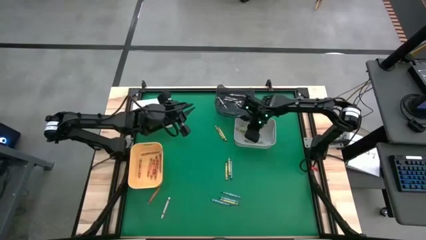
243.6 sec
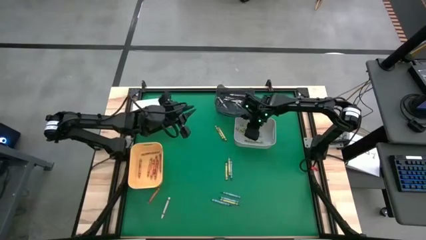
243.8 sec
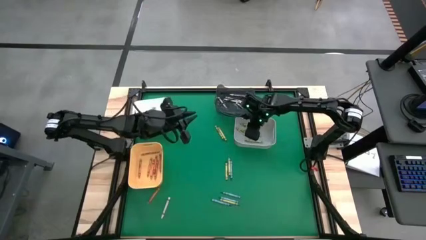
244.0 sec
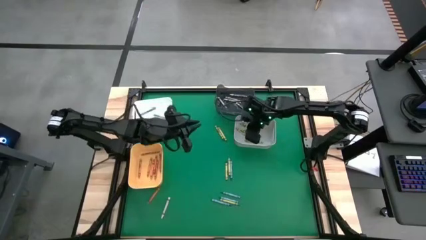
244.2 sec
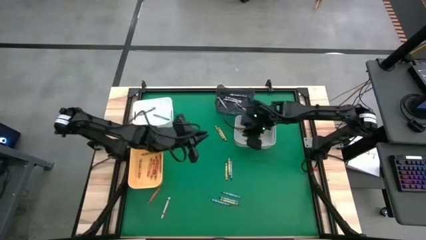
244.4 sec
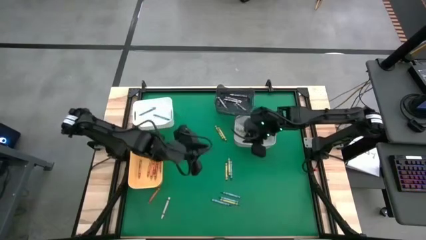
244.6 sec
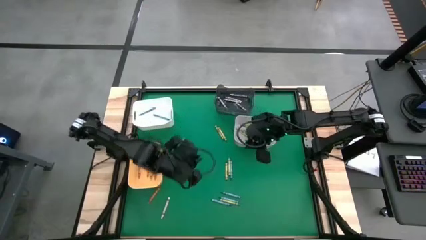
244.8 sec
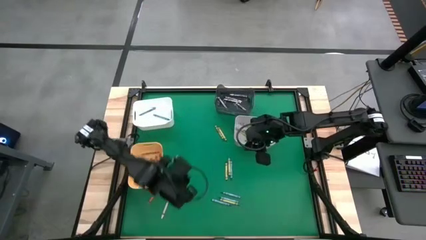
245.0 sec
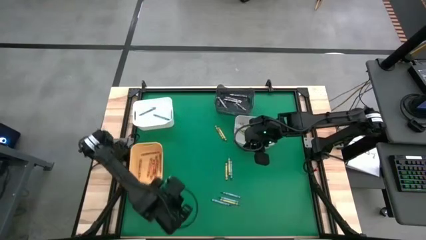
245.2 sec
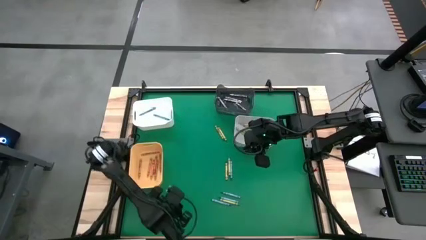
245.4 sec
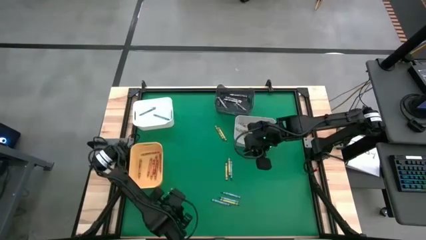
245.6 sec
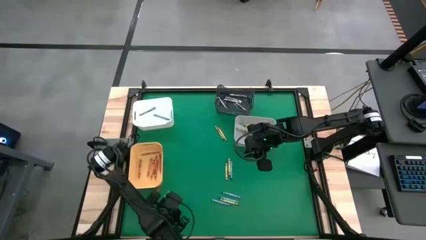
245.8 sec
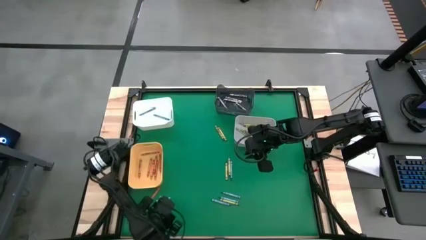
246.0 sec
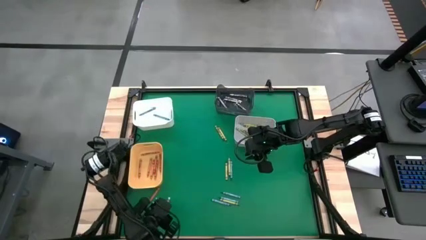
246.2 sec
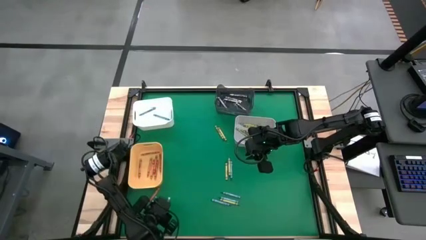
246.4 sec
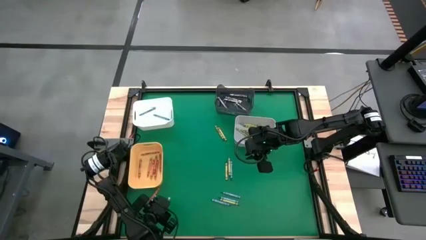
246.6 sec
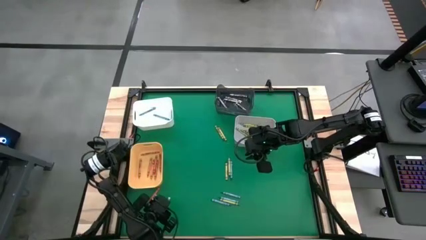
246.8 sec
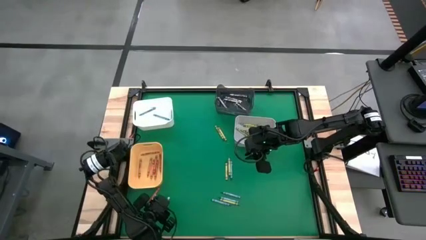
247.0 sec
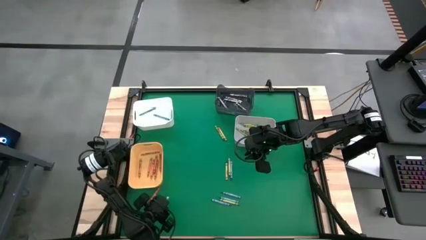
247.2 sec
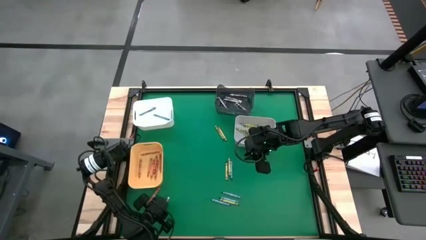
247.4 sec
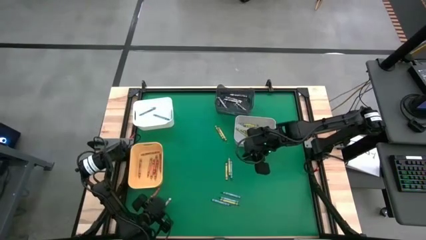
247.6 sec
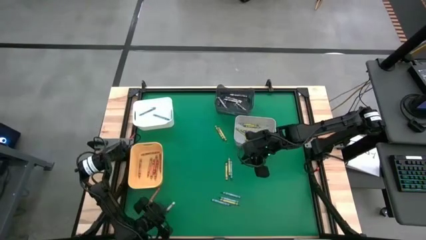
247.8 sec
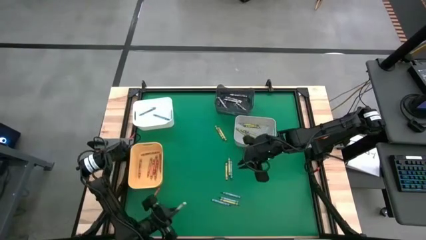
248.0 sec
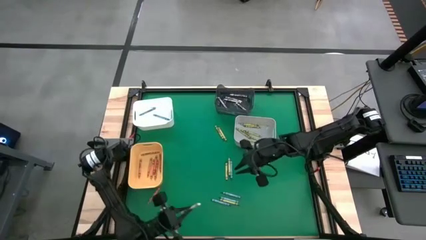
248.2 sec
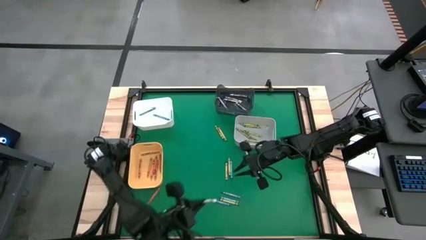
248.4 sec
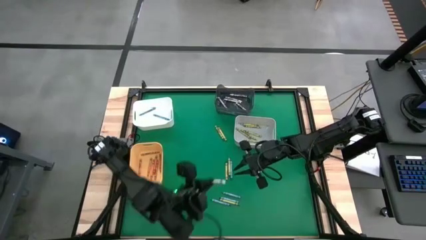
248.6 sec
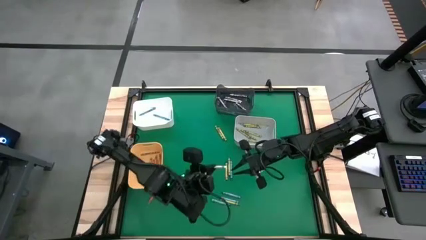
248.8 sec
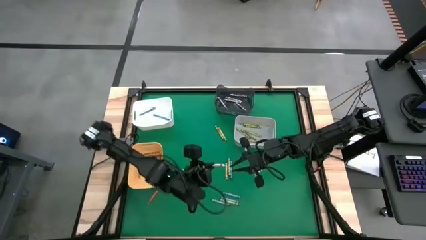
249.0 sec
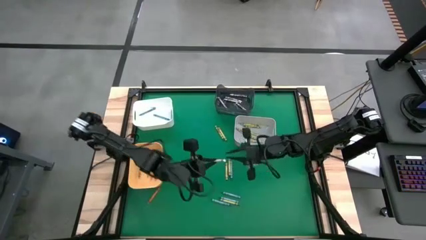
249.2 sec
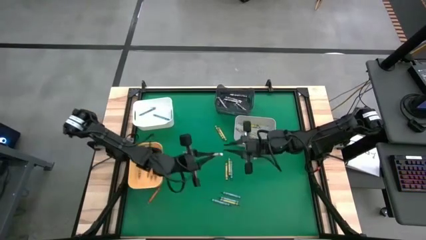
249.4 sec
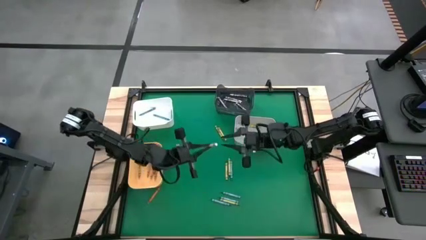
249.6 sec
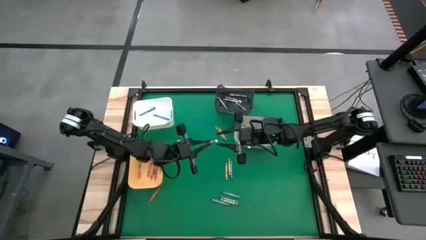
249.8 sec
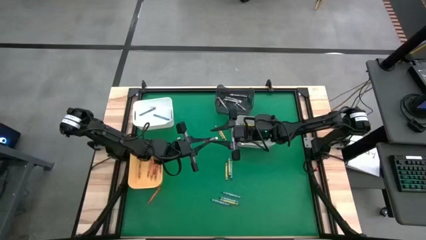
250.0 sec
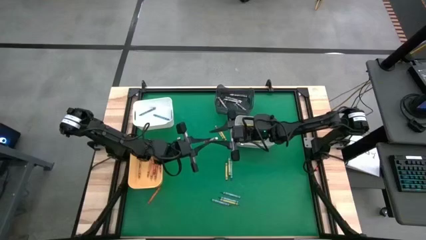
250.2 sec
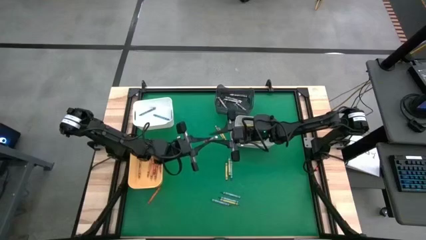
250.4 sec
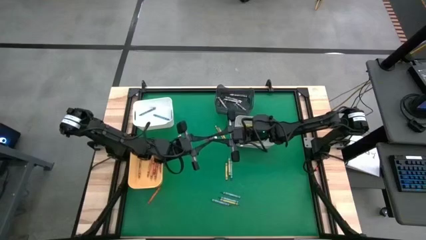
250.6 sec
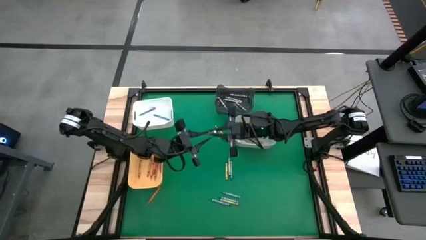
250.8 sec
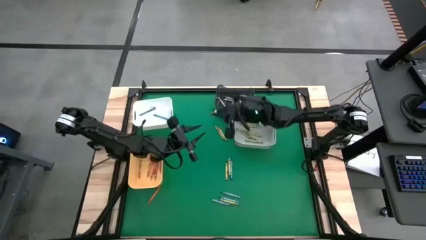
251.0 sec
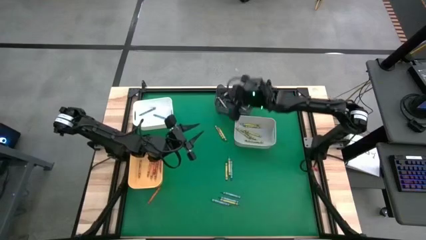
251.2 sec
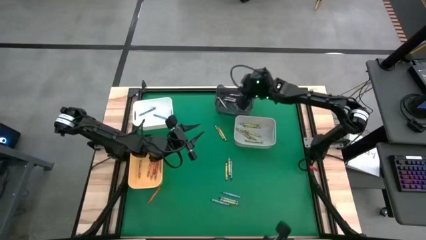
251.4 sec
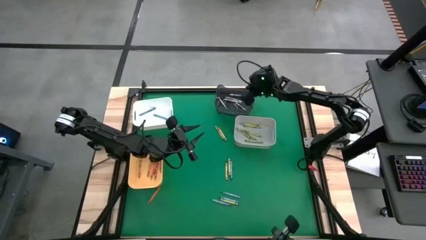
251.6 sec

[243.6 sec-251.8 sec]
Task: Sort crayons
Put the white crayon into the black bin

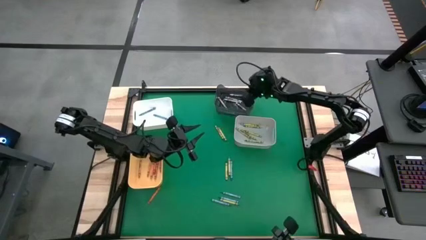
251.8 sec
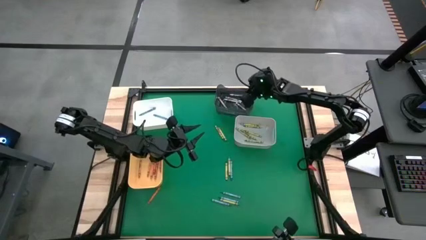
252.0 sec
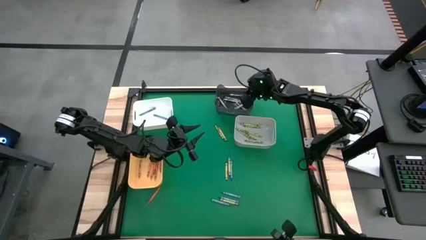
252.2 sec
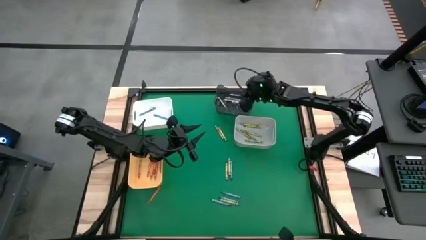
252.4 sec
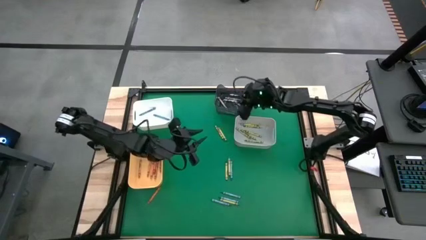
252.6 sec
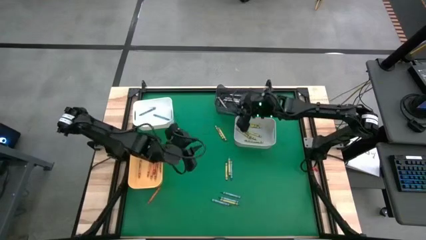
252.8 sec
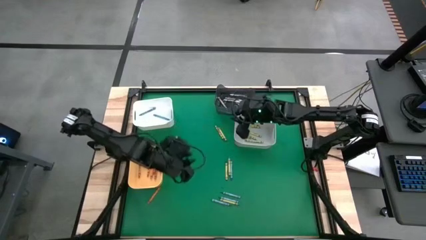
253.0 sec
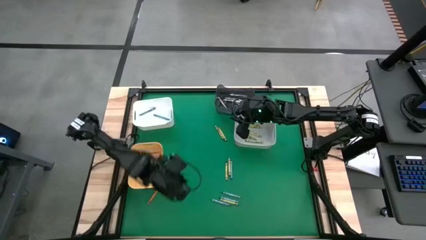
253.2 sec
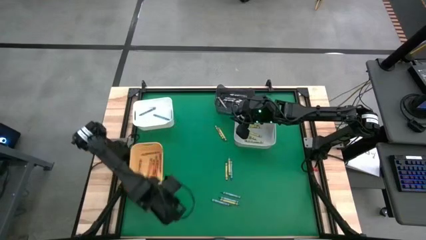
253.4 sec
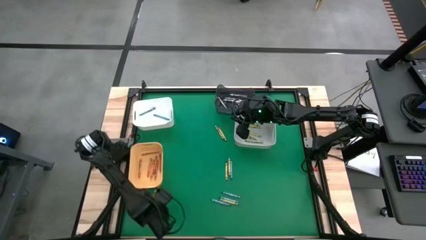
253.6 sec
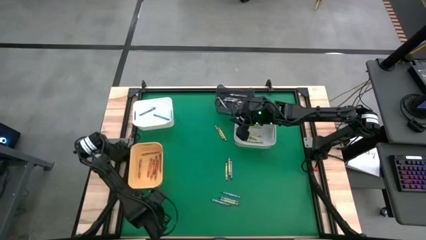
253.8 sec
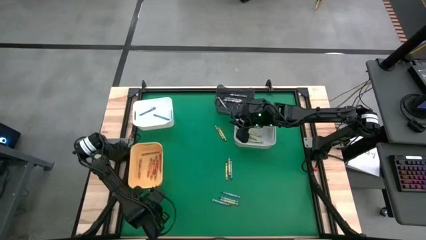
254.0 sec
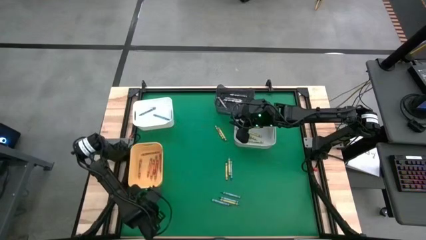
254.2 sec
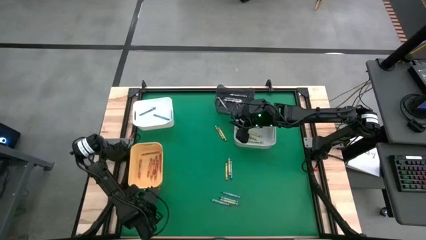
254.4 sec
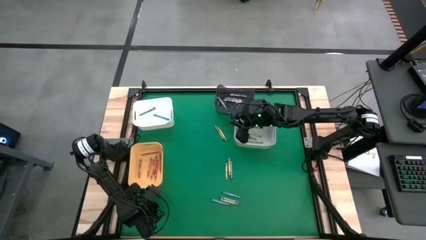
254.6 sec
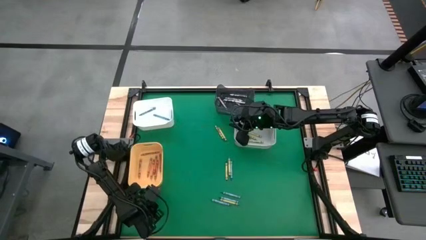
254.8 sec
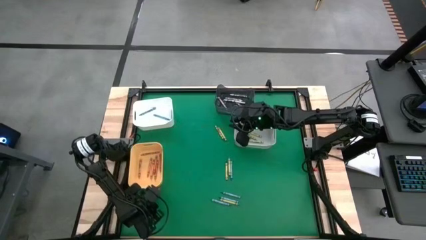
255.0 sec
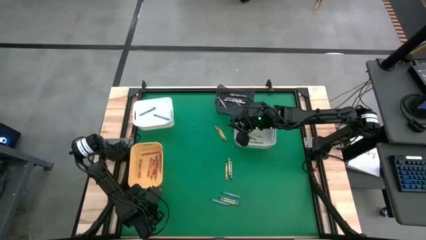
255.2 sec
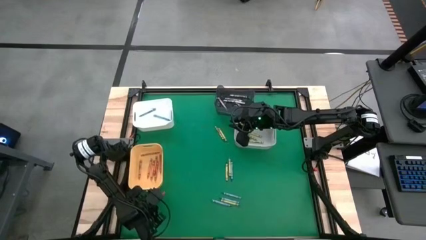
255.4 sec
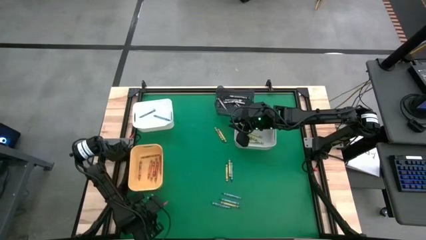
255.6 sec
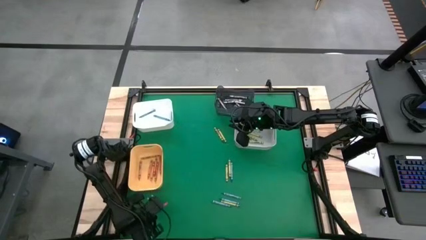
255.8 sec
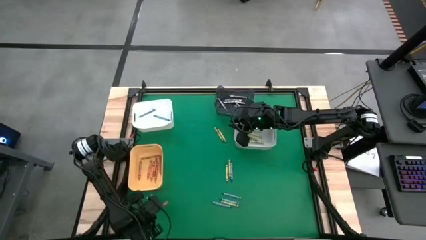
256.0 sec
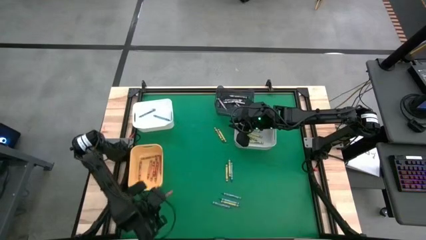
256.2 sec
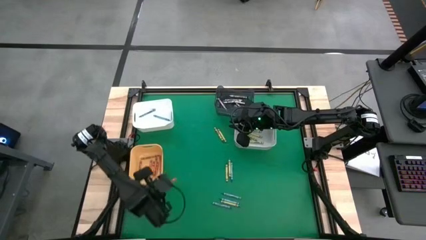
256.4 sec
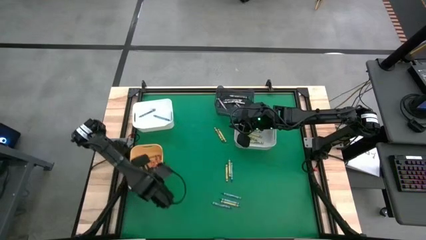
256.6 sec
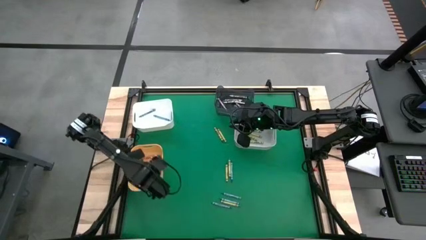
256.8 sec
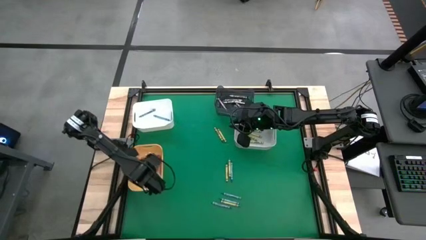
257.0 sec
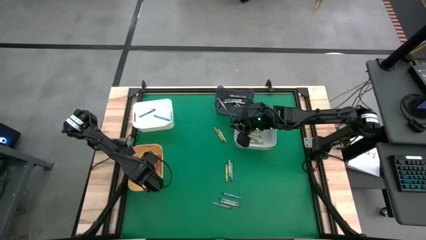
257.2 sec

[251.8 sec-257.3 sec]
Put the orange crayon into the orange bin

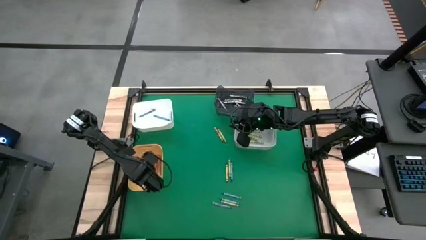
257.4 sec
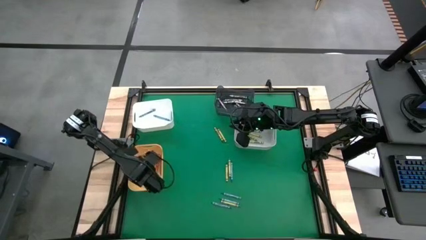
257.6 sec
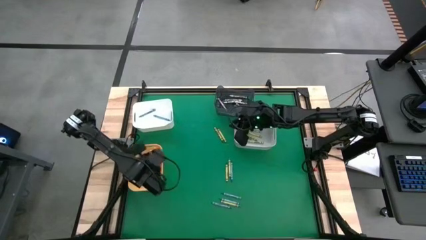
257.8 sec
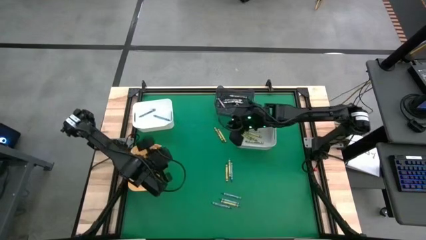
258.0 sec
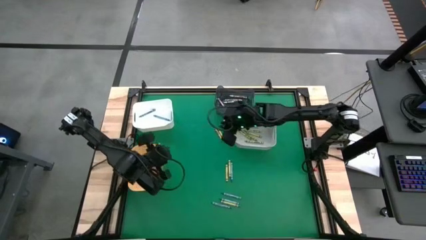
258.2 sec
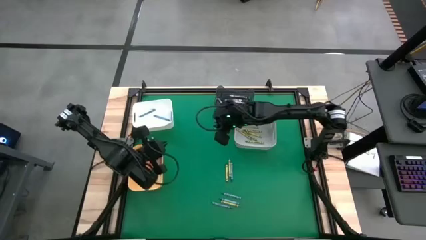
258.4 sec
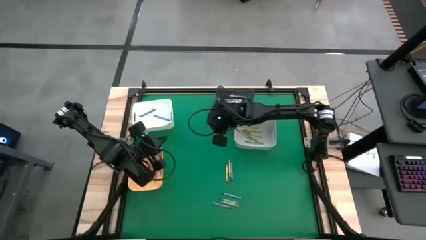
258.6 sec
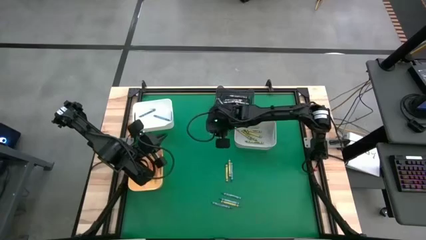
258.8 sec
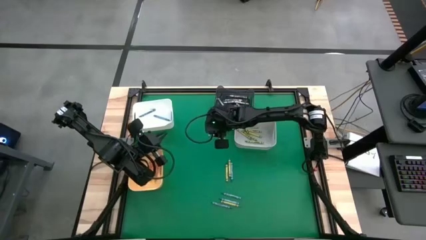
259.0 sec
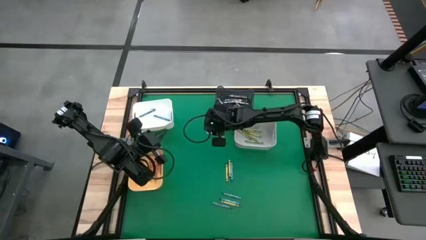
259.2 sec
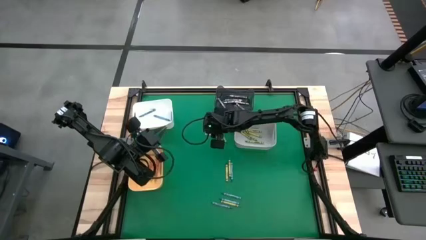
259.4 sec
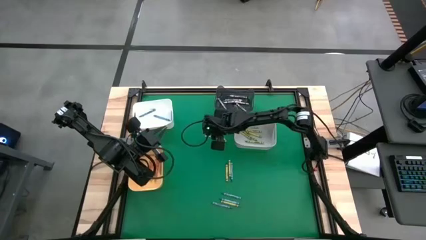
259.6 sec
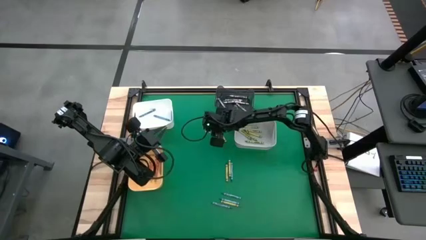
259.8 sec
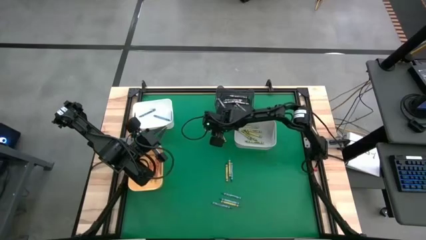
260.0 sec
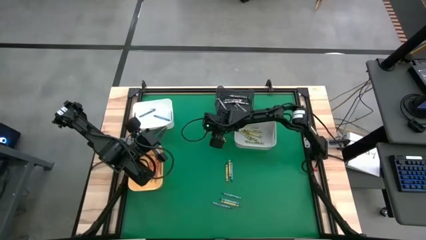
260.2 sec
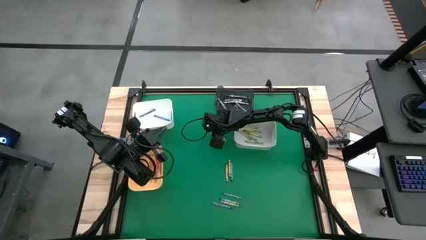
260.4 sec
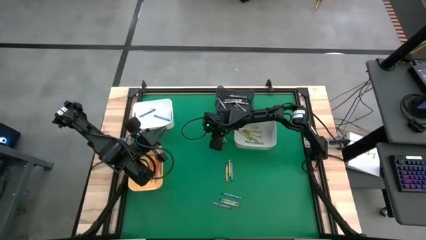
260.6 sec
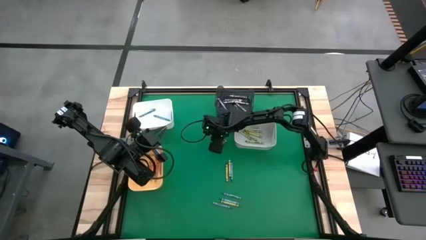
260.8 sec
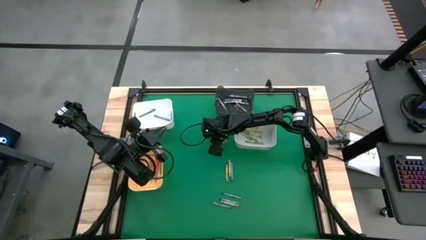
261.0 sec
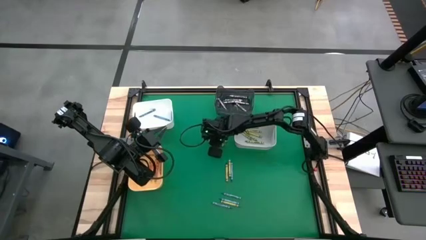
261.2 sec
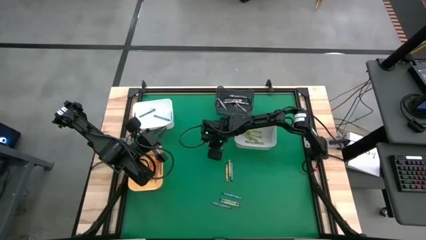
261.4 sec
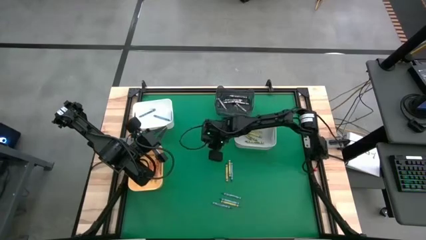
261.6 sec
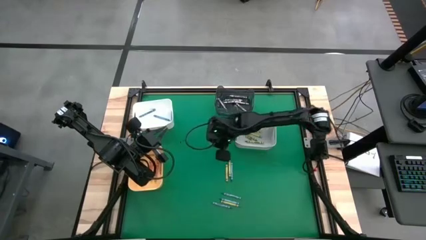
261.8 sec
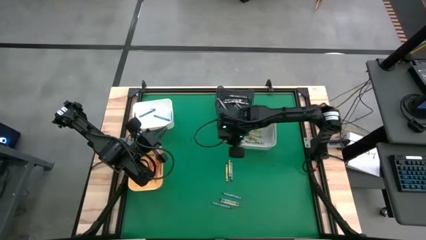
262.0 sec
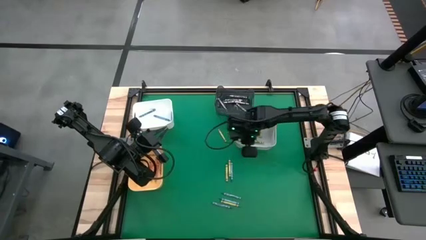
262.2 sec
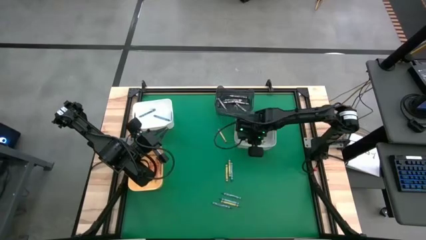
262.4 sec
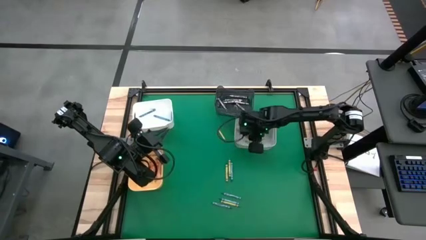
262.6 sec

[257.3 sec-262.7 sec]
Put the green crayon into the gray bin
